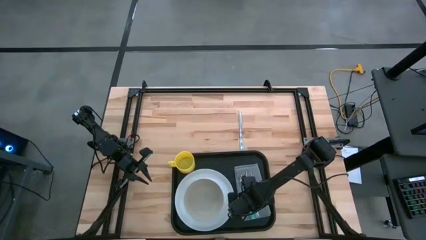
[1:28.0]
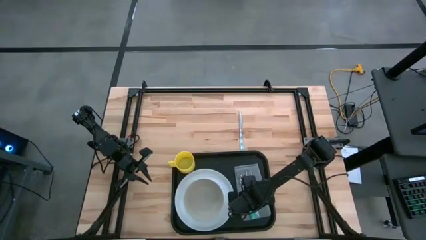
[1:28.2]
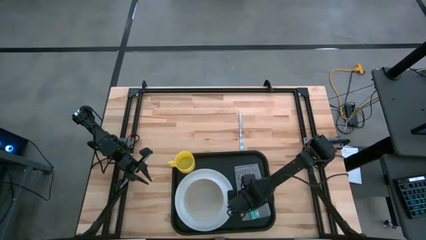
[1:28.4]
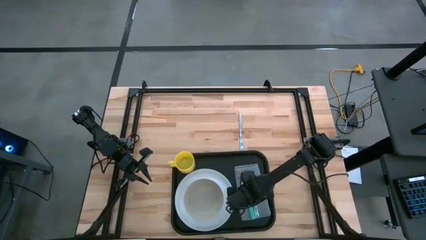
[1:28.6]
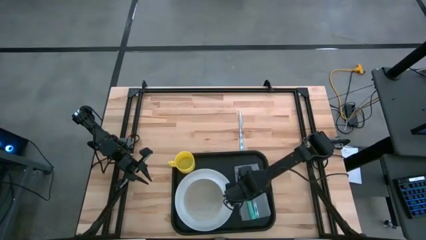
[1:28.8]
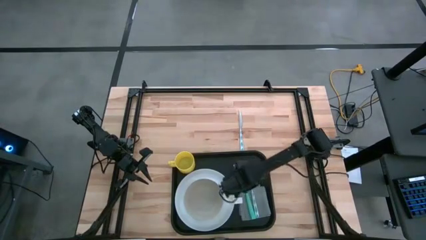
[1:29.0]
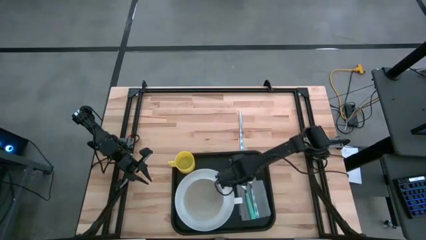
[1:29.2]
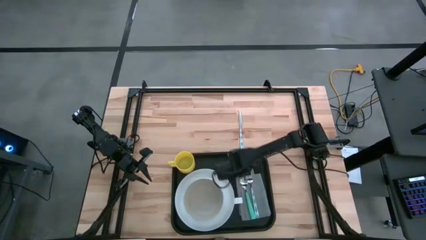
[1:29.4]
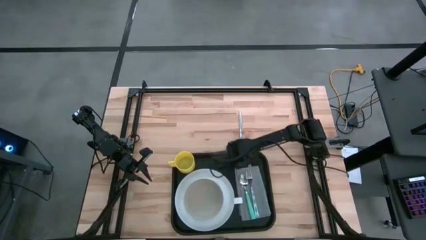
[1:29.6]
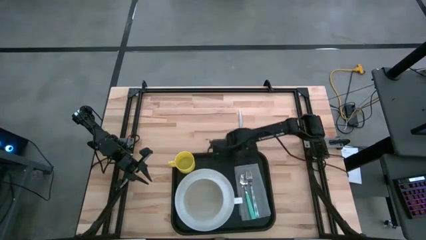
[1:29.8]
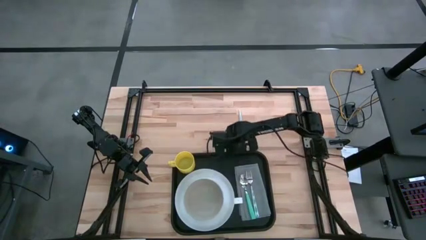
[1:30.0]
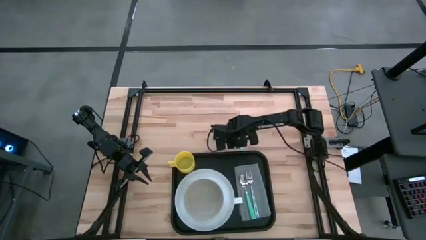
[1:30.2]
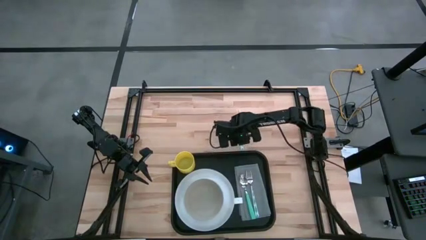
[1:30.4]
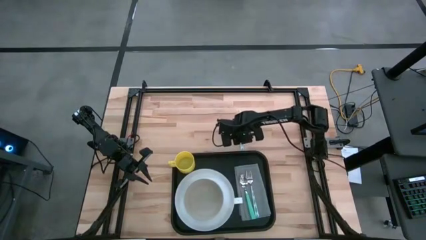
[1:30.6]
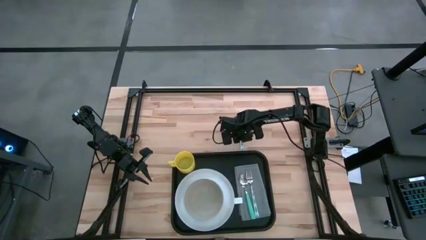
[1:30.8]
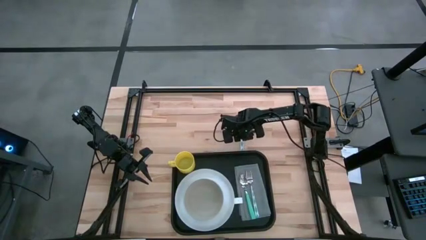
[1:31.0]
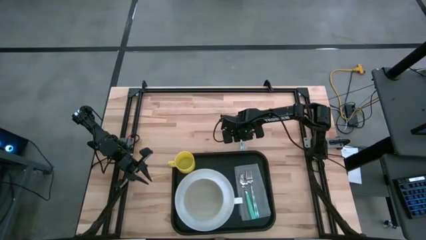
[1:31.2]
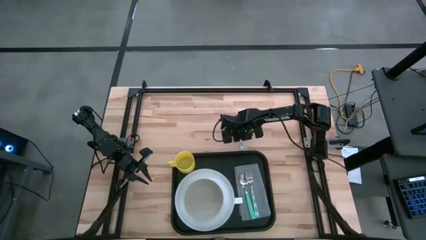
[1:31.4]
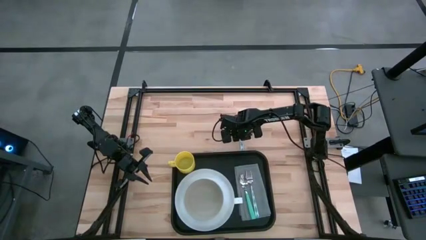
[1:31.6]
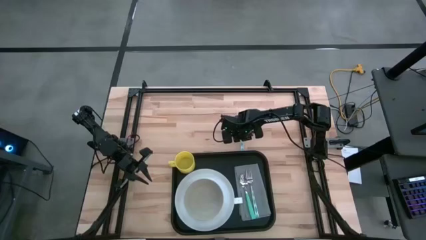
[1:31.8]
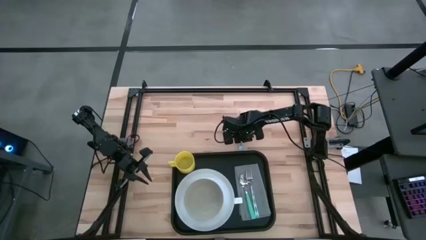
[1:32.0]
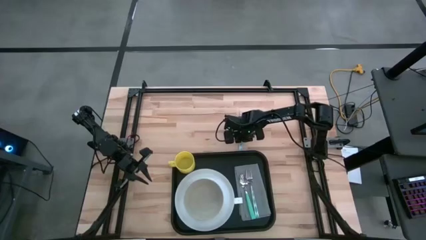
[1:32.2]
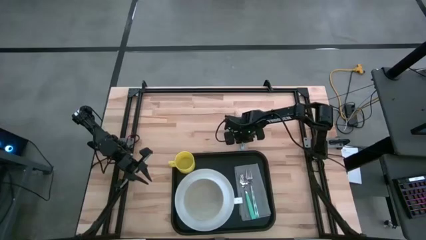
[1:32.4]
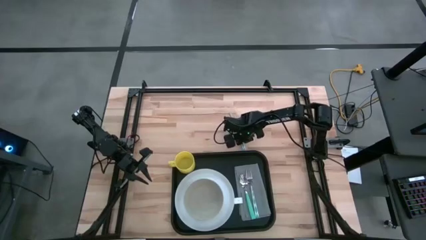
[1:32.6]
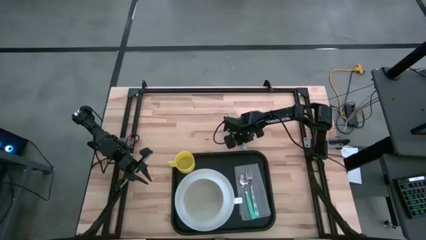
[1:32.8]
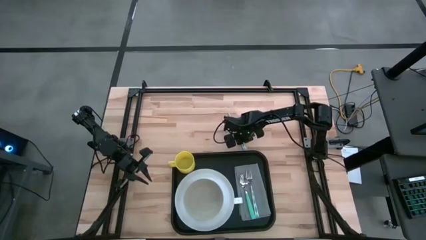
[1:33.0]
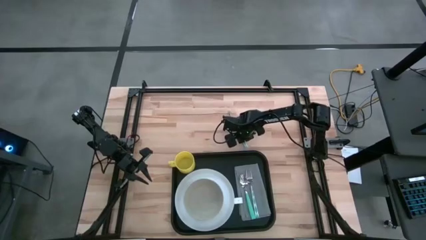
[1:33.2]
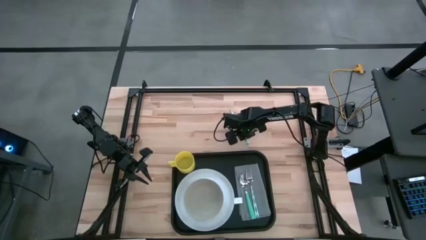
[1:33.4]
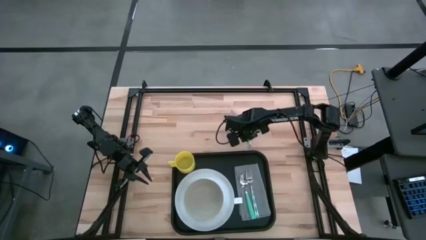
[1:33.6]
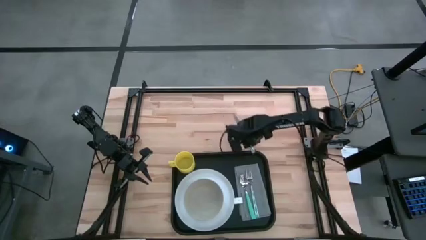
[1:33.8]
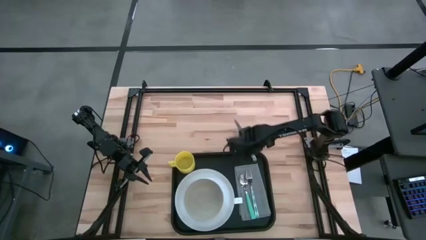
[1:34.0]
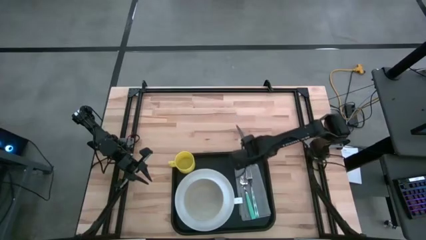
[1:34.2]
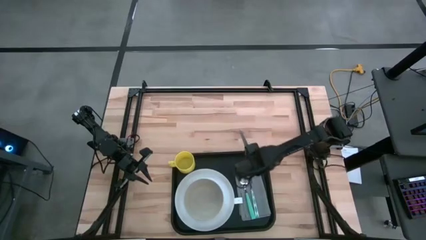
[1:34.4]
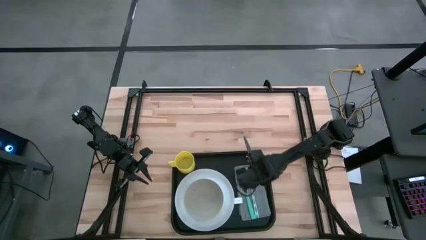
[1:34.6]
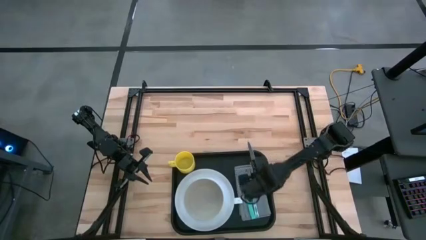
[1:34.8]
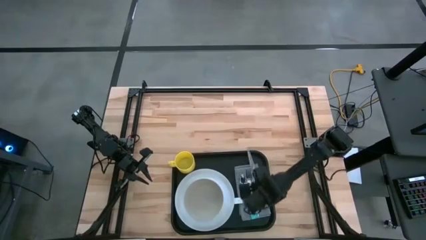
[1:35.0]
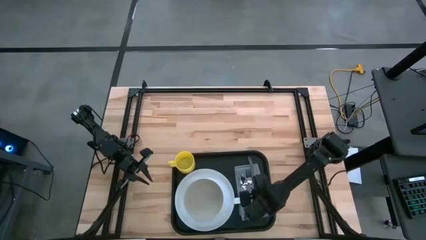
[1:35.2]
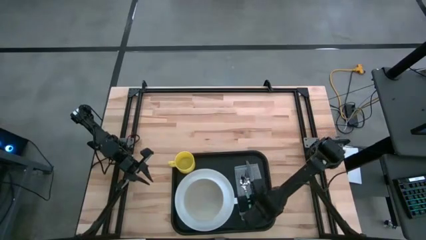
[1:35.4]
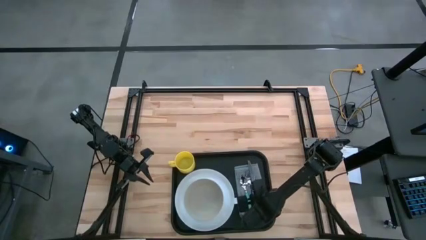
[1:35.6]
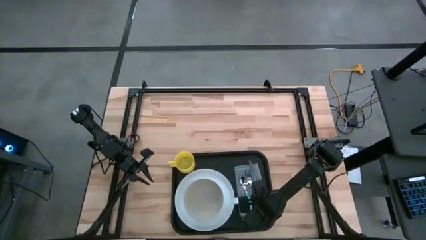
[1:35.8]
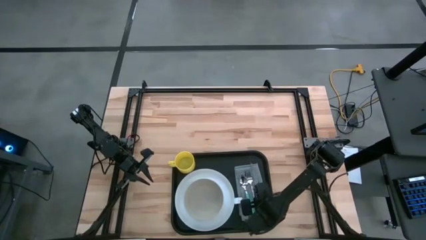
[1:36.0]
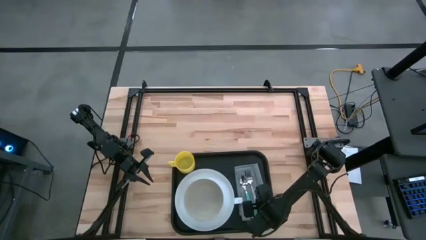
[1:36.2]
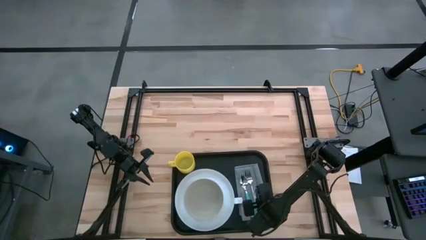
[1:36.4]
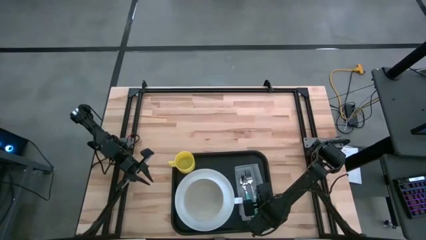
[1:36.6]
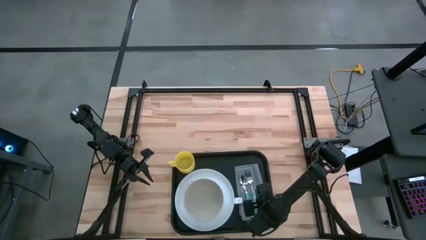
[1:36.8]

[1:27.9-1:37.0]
Task: Set up tray
Put the blue knife on the gray napkin to the right of the blue fork

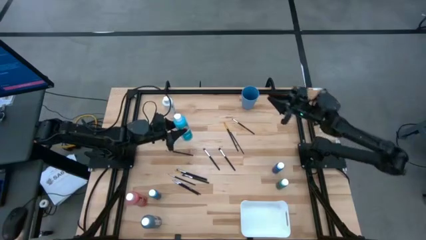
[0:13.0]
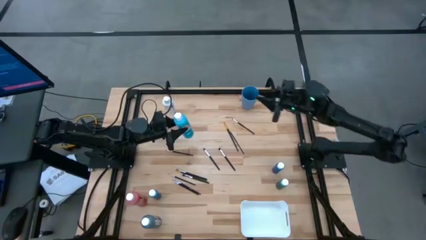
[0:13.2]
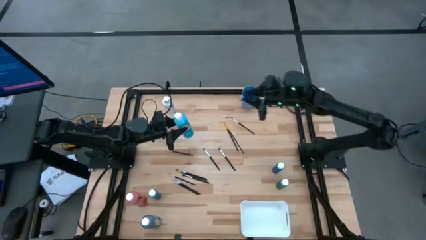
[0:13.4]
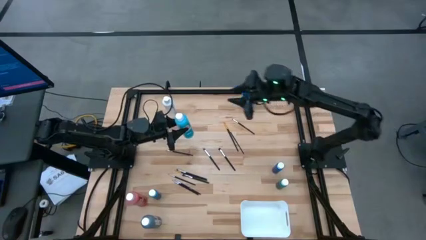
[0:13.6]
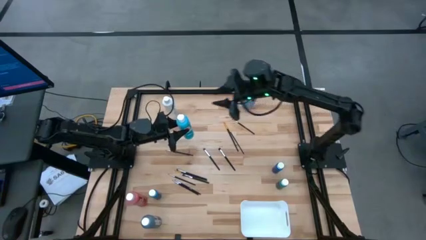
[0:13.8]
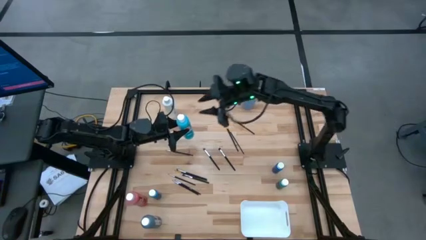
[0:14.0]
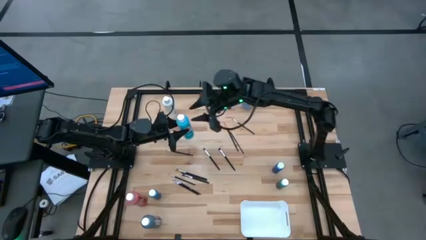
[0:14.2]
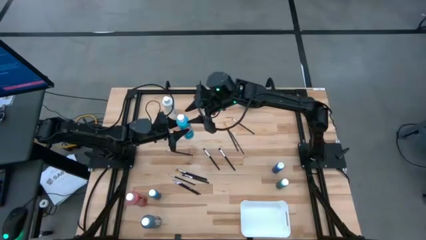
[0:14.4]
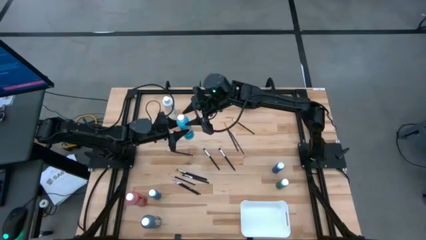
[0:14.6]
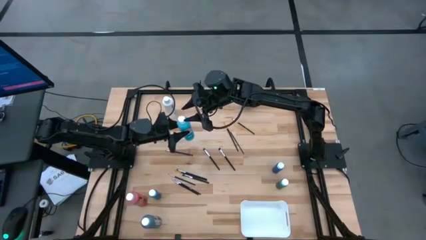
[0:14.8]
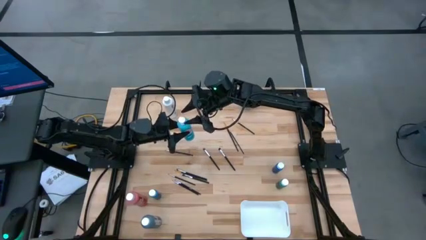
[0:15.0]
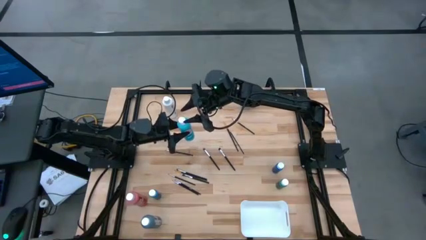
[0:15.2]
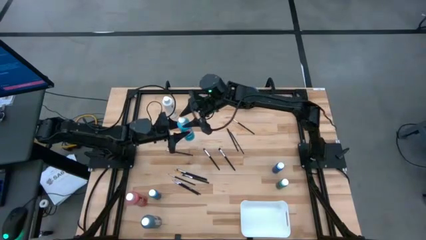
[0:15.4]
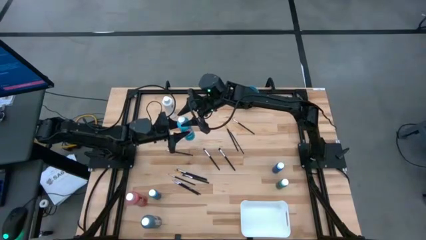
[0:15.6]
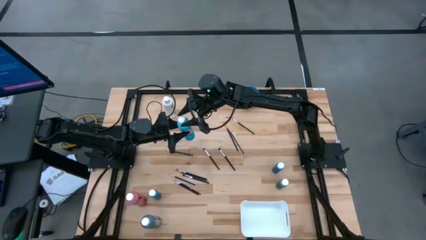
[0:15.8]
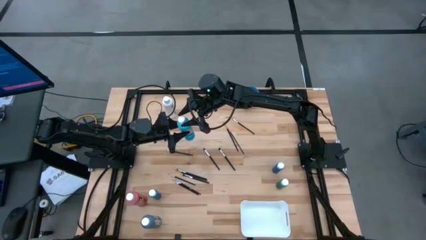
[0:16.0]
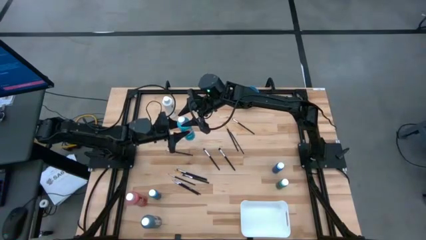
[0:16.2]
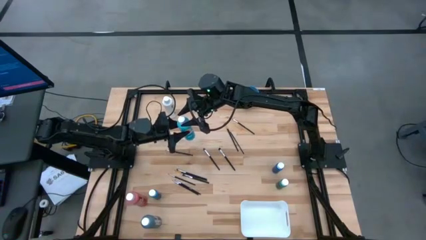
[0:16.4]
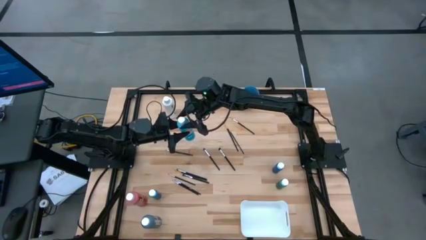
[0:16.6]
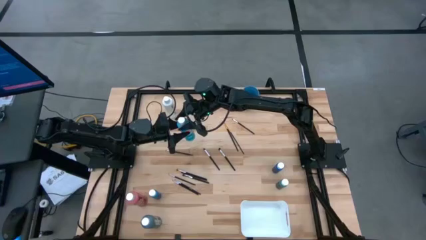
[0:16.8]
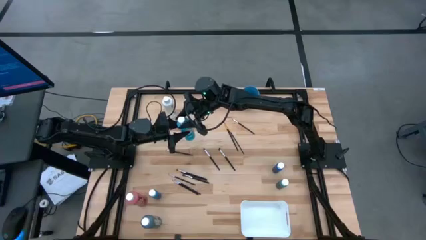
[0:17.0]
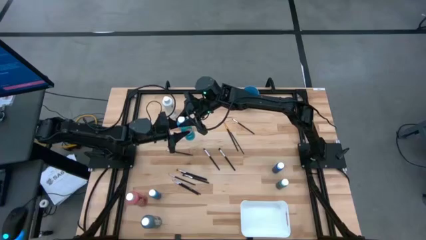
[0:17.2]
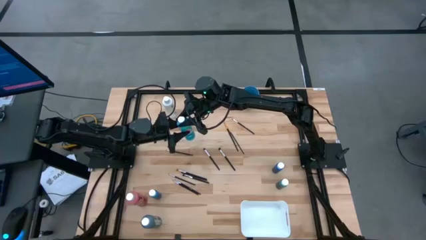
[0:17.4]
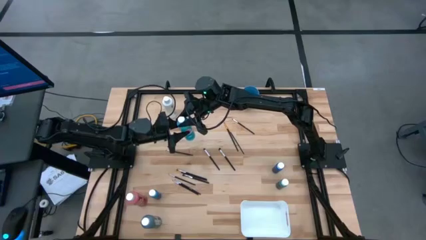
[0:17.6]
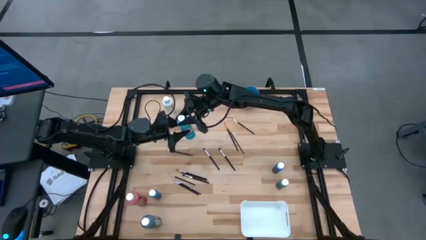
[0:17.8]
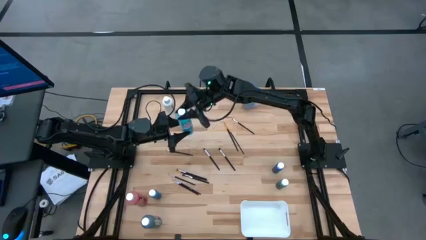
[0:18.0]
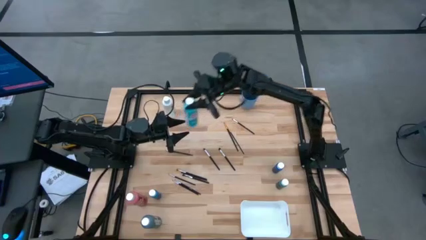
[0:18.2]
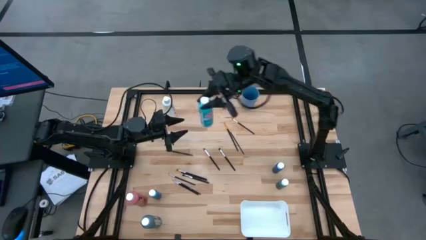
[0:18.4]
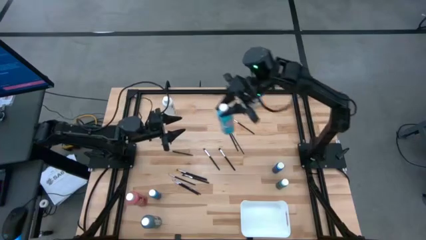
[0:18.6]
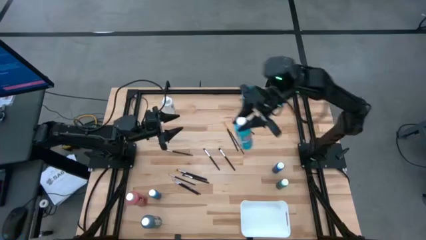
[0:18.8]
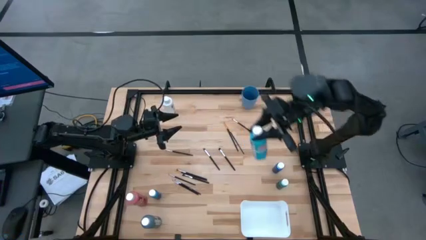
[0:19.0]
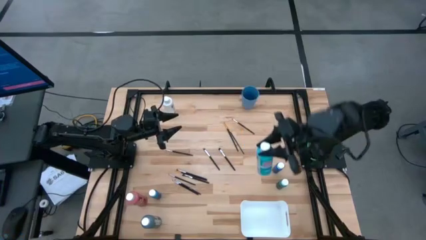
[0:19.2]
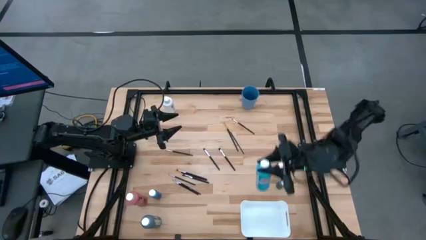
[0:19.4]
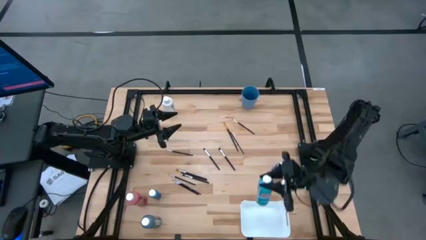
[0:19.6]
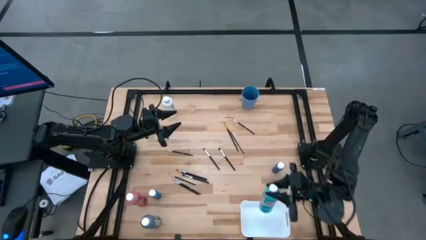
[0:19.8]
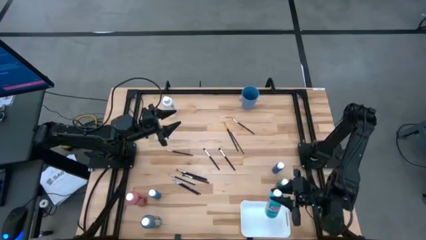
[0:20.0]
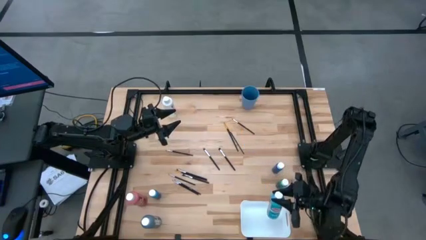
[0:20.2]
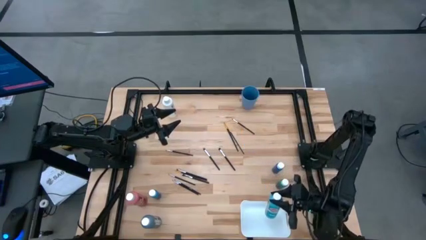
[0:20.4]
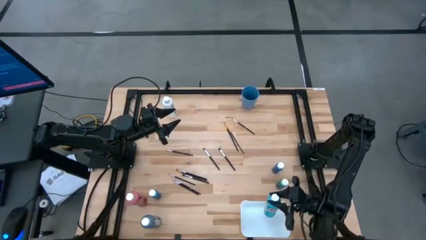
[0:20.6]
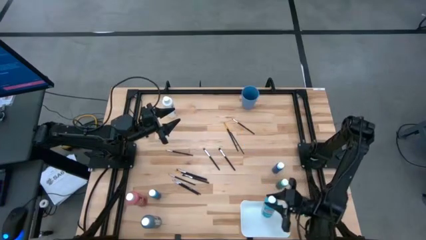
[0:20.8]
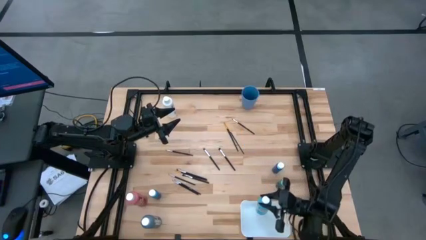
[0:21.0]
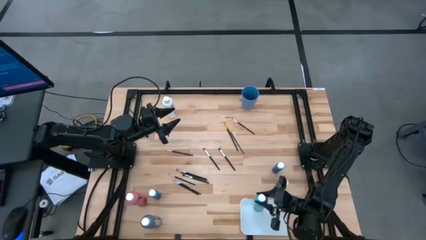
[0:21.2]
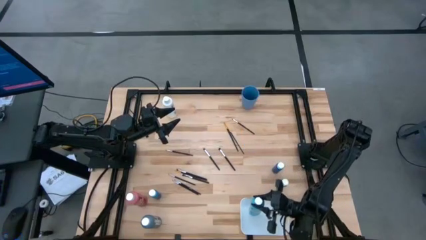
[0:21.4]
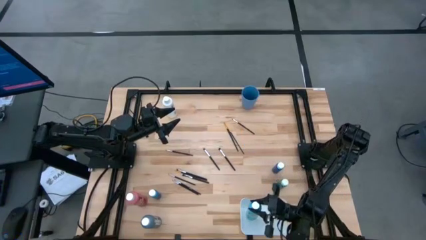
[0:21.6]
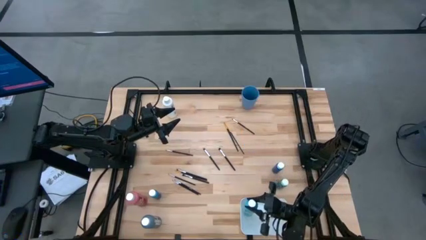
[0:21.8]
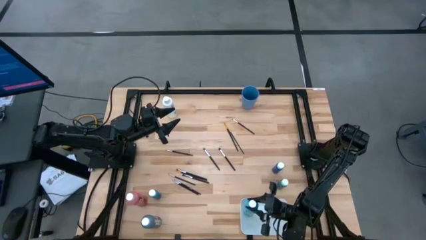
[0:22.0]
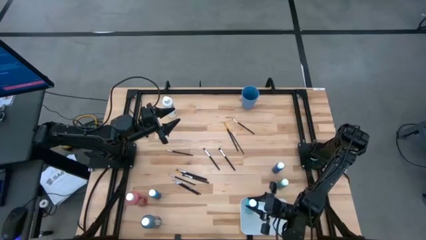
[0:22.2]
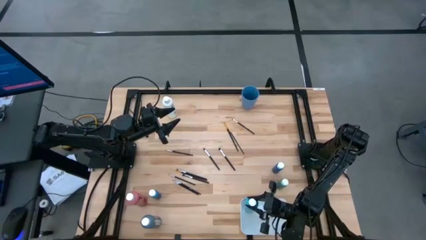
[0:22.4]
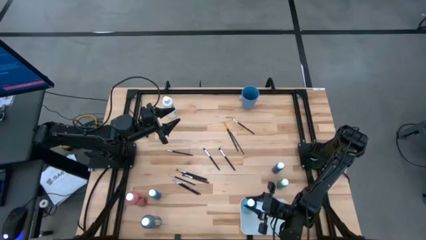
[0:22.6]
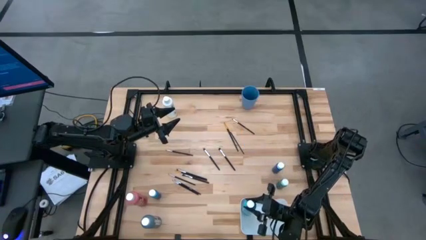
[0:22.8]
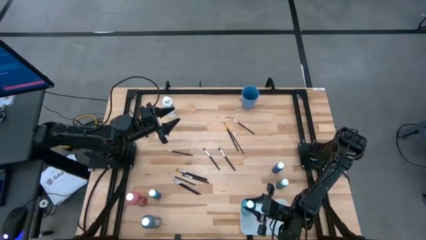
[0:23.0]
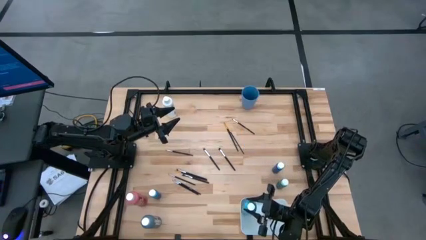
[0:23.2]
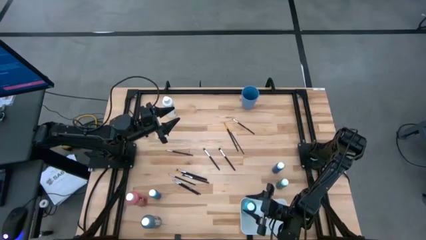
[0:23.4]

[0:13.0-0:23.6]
Task: Pick & Place Paint Supplies
Put the large light blue paint bottle into the white bin
